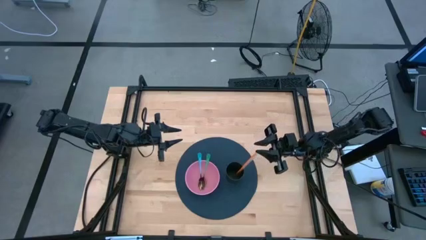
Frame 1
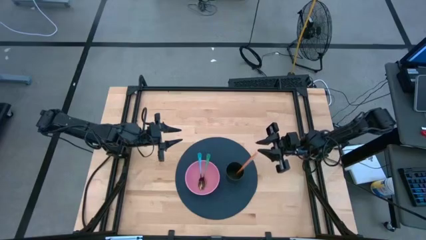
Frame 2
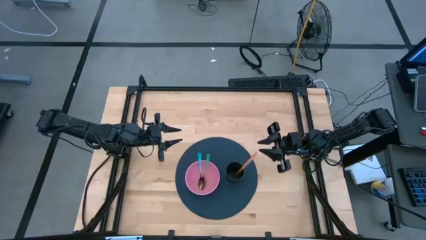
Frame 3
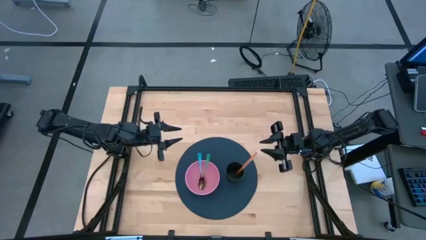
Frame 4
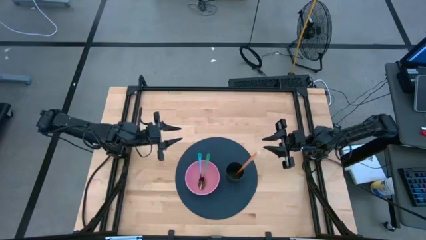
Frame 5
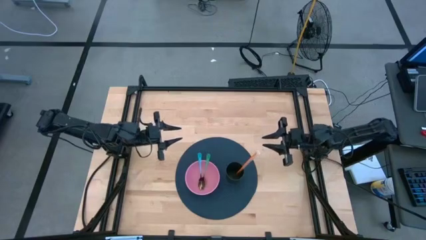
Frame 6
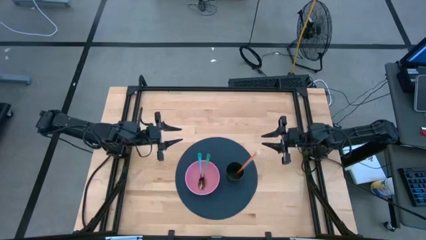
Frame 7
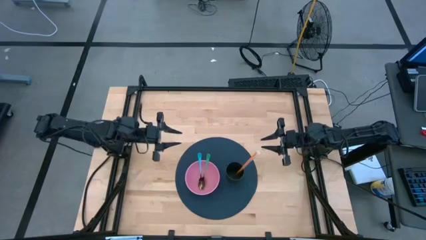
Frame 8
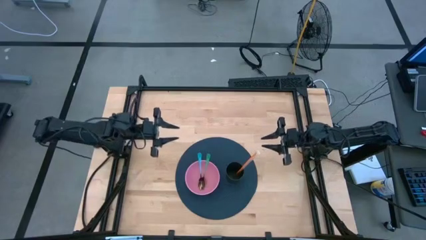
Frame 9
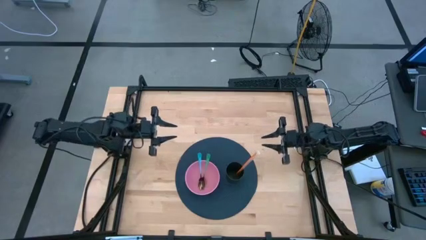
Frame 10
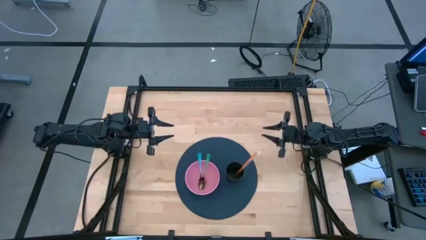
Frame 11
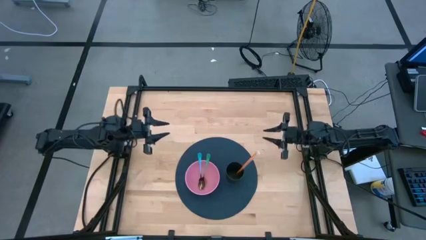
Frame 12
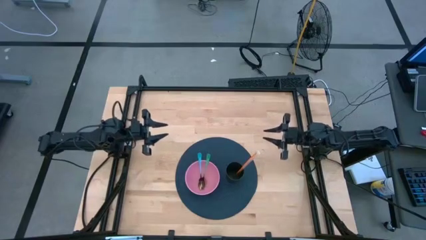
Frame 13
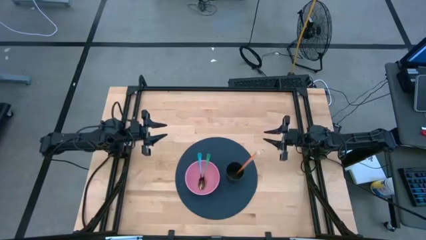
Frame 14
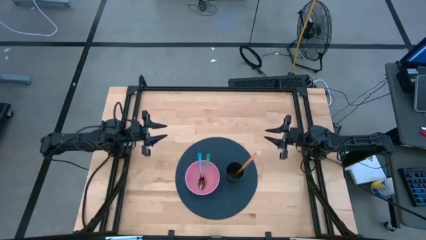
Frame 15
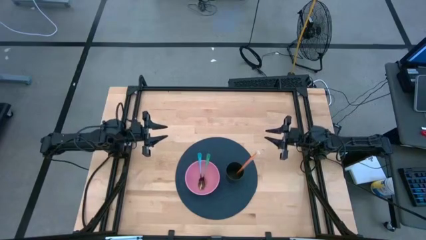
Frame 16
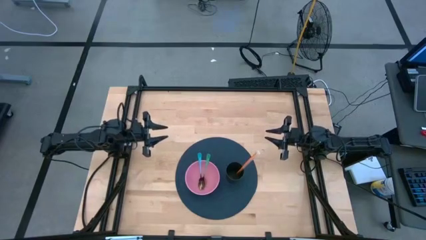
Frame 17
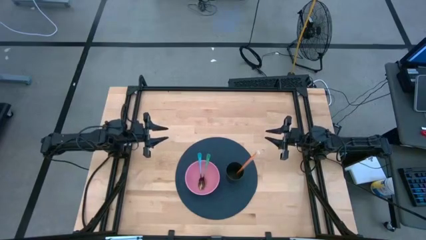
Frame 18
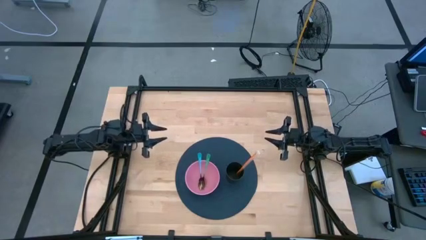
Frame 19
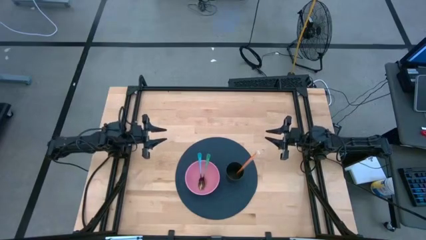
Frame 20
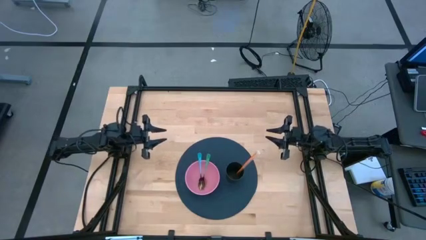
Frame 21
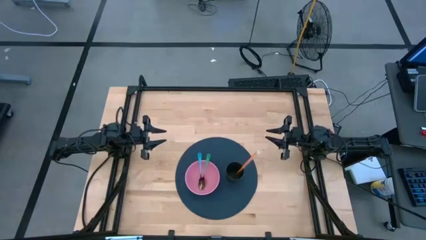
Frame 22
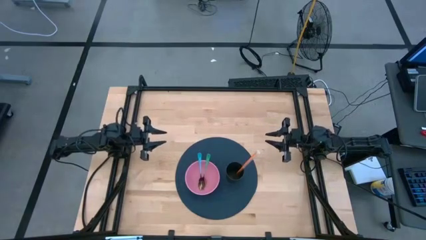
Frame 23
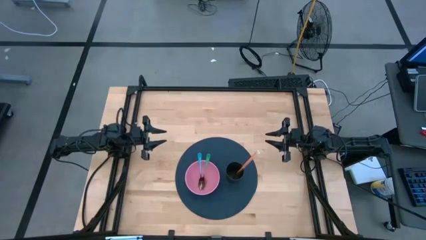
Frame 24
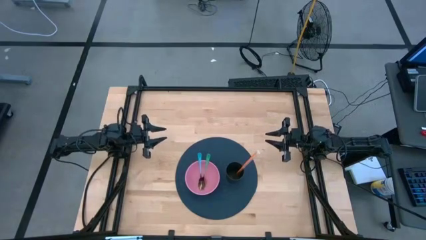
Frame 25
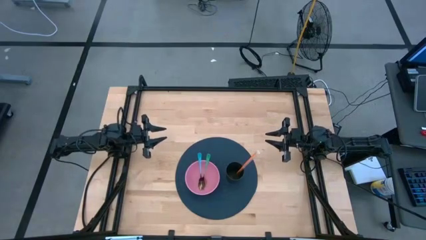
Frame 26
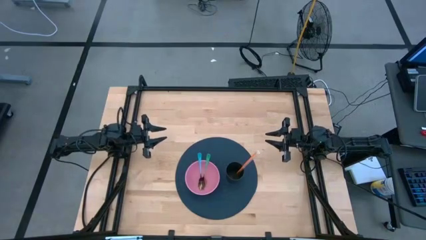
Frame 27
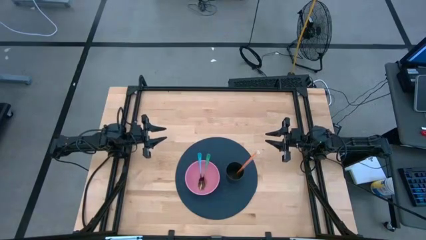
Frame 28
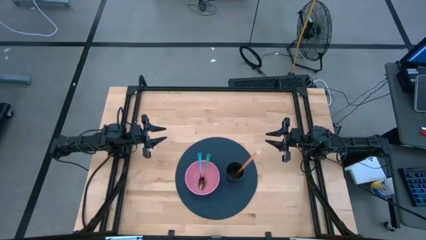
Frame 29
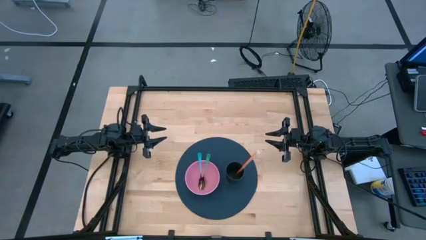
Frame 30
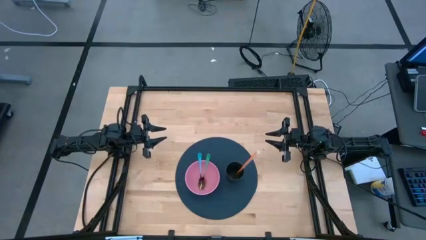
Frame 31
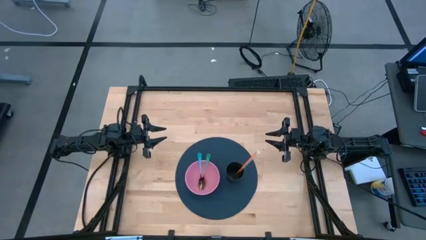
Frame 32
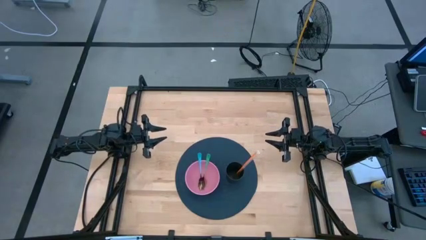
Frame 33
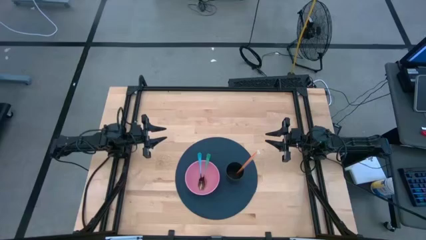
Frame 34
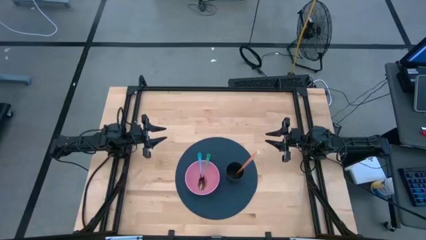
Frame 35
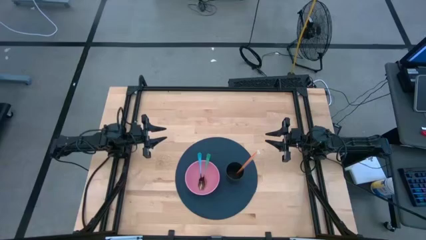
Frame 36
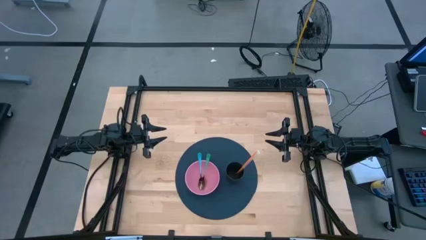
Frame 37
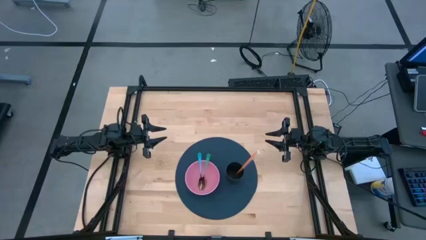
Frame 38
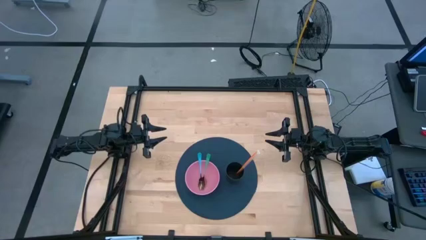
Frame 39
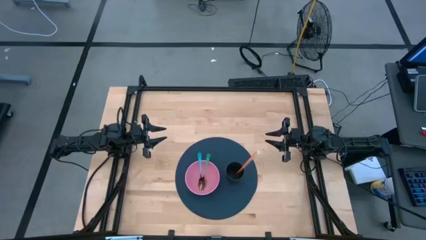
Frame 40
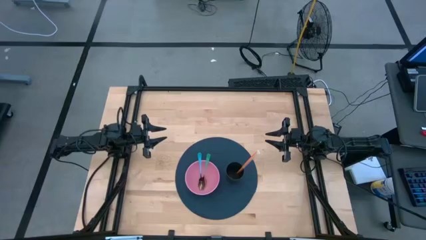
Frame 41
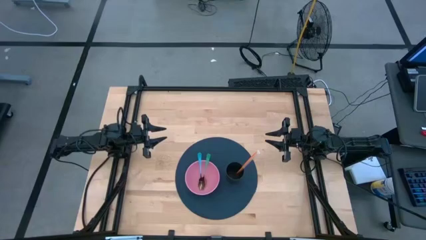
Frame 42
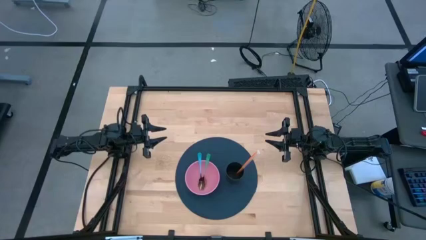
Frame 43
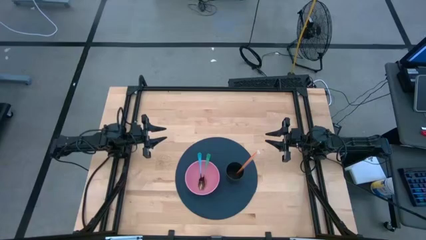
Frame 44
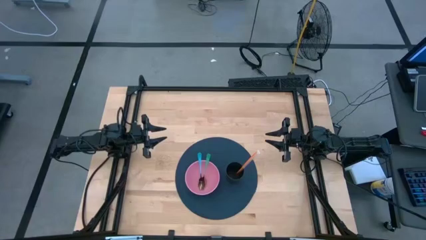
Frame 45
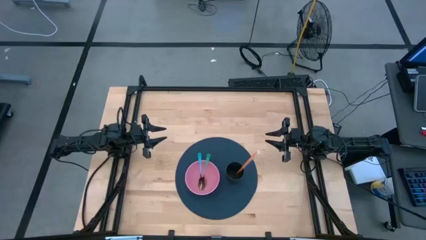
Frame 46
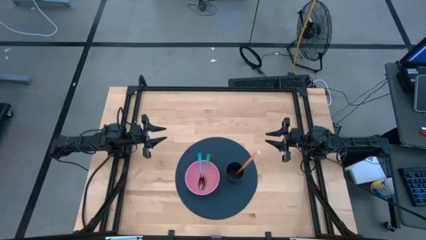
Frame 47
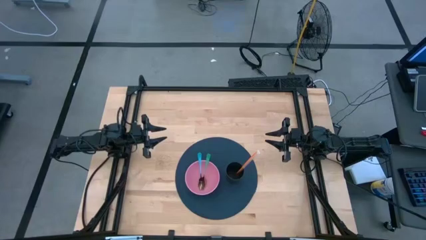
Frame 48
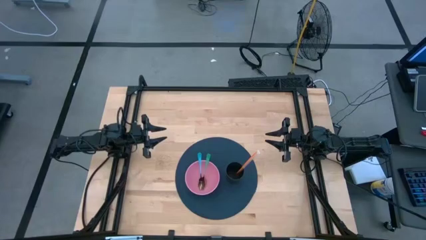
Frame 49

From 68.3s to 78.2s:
Task: Pick & Place Utensil
Return to Home Position

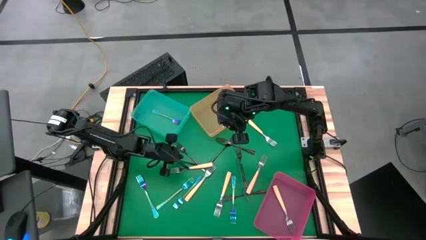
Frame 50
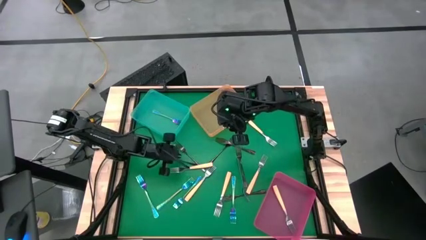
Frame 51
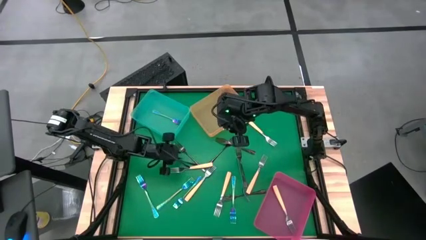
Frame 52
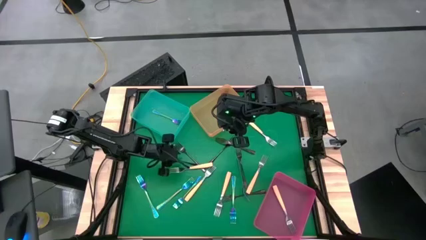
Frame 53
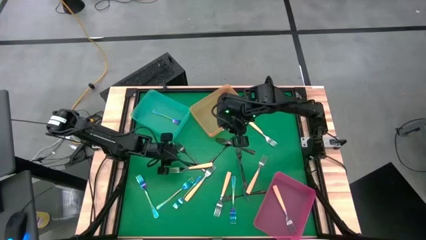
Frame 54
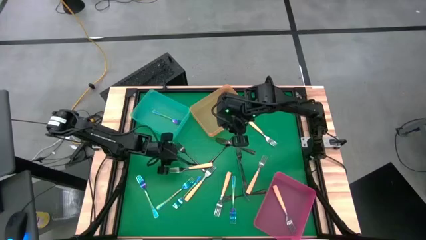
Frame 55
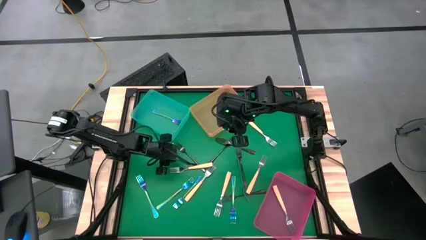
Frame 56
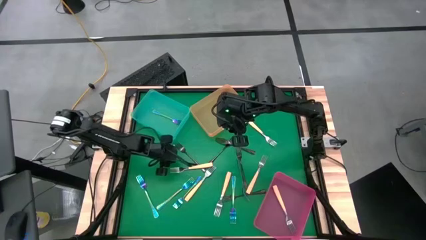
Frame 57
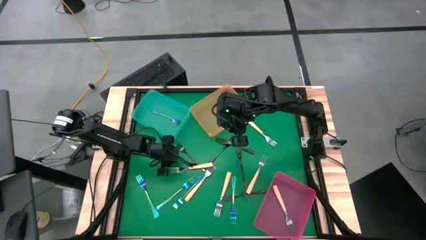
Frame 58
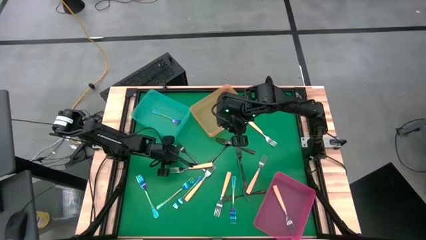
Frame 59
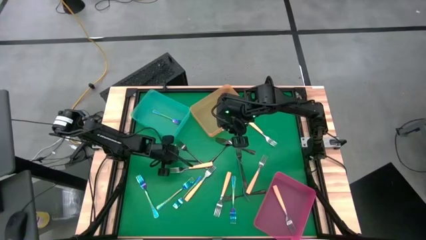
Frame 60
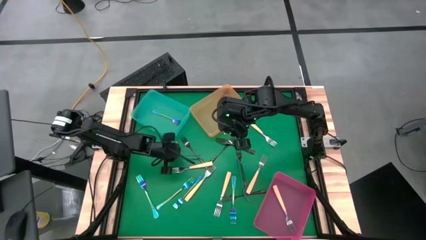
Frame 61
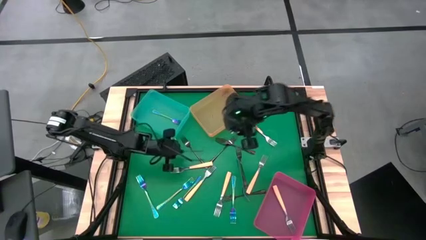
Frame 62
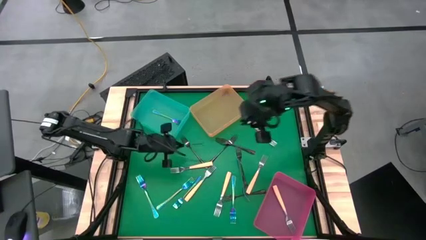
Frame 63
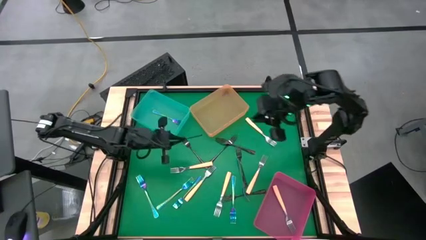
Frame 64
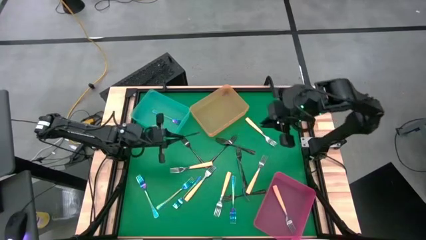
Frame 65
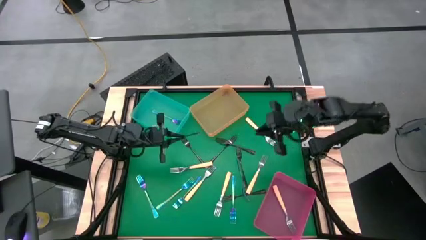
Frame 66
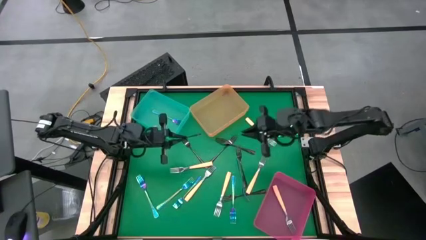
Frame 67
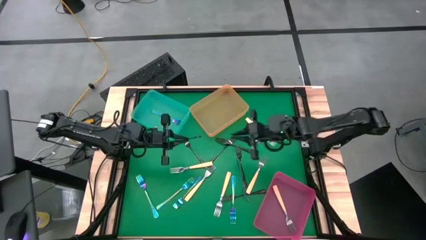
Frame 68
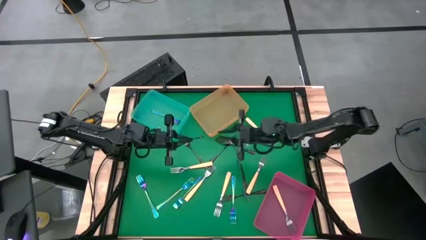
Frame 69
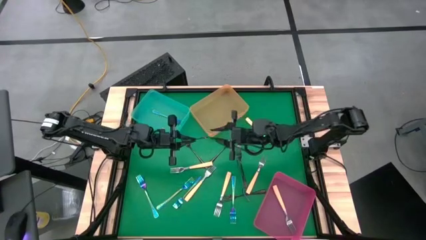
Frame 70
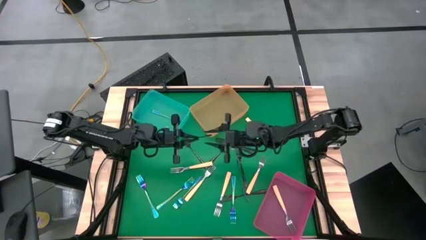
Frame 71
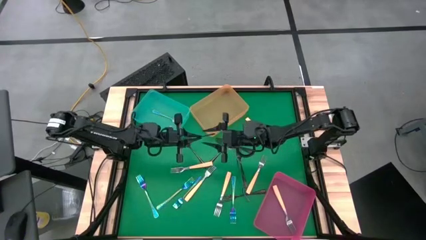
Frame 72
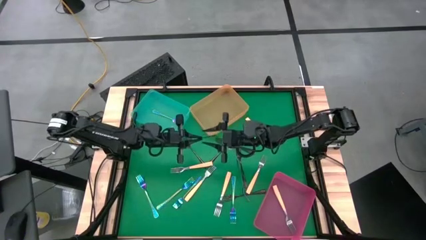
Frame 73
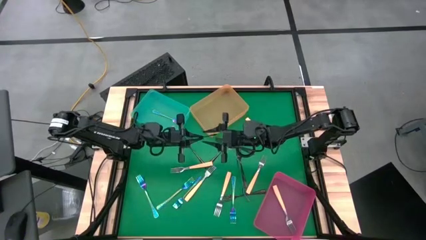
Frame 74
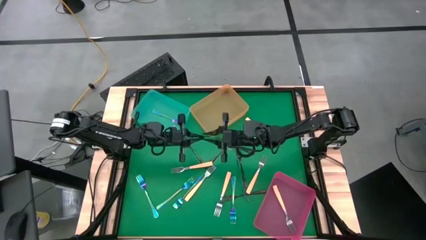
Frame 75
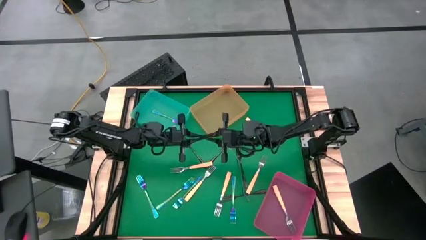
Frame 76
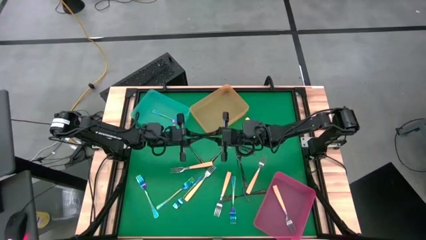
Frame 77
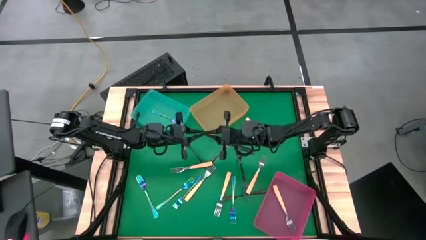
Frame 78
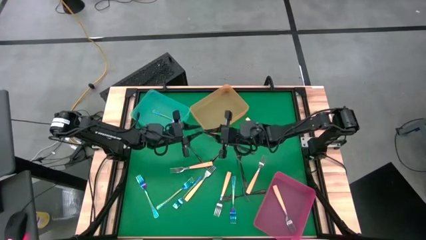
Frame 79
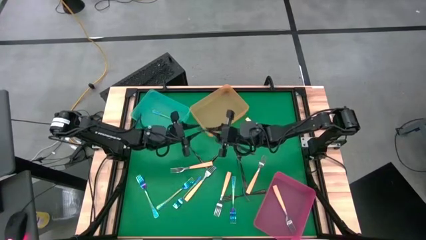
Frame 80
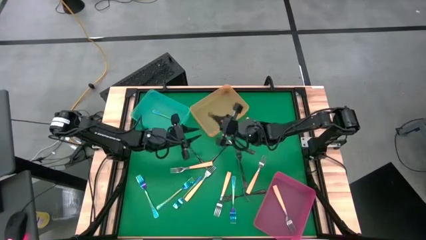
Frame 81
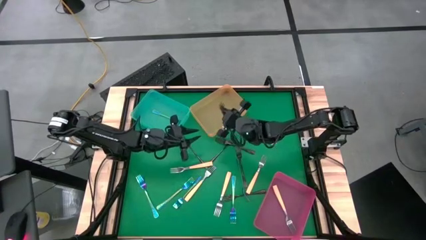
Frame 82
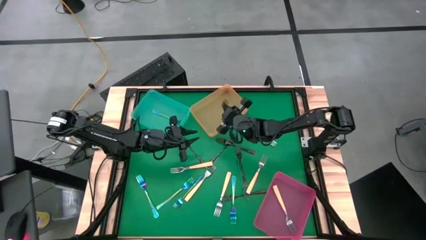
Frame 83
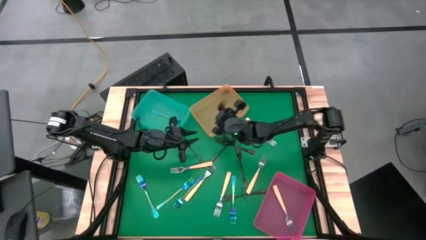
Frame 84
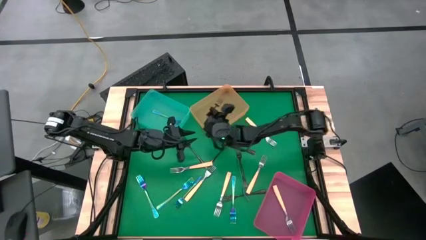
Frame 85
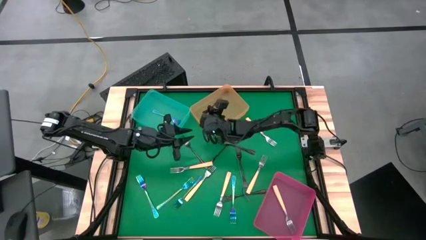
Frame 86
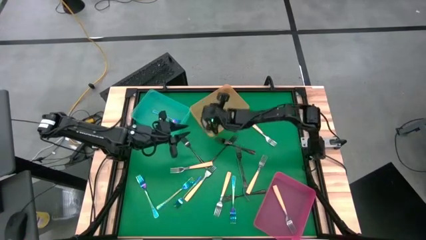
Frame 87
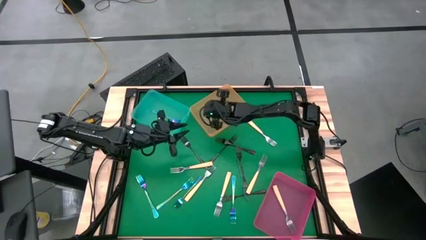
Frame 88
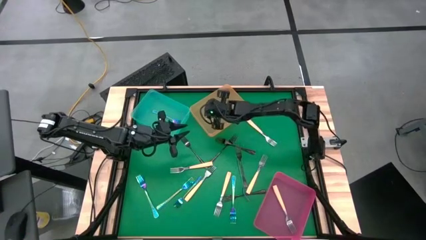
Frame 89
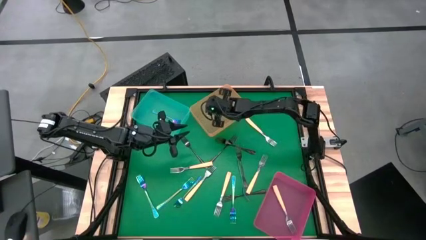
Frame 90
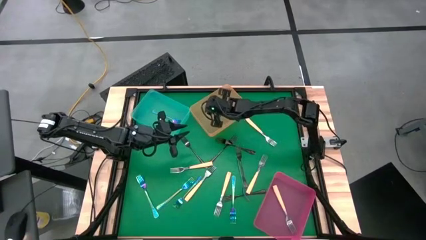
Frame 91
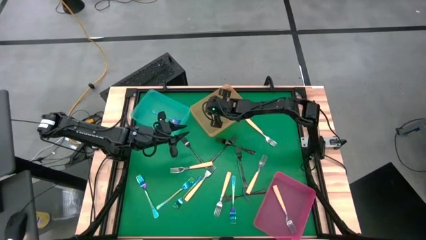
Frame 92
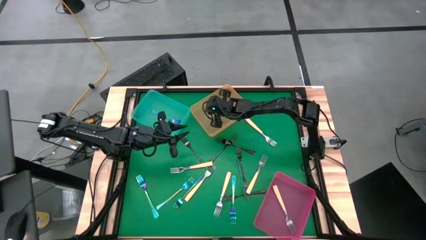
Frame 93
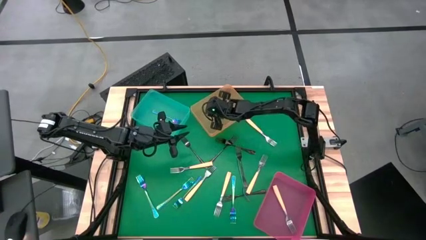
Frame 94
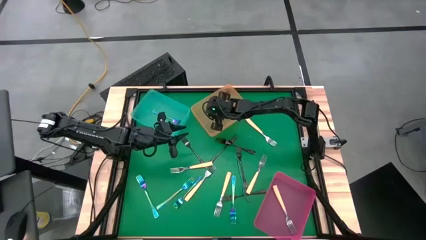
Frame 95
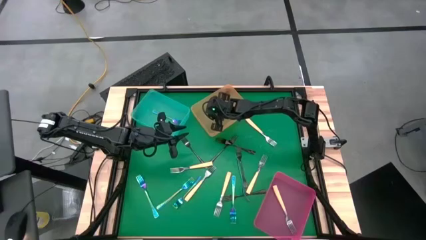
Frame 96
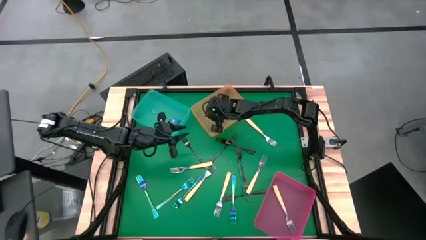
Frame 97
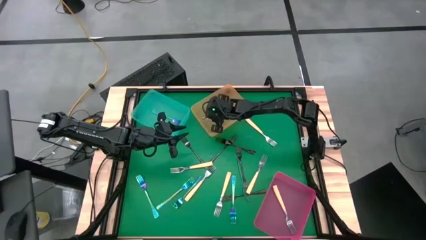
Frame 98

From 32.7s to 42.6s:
Task: Sort silverware by color (type)
Put the black fork into the yellow bin
